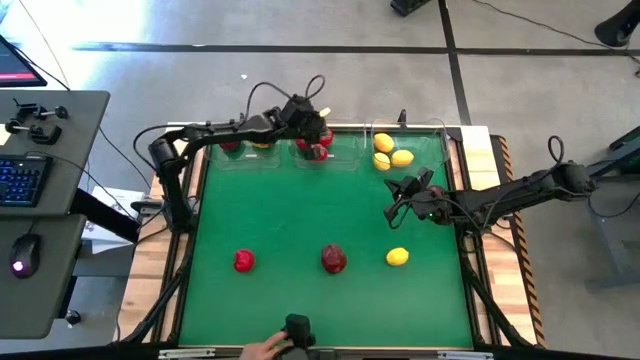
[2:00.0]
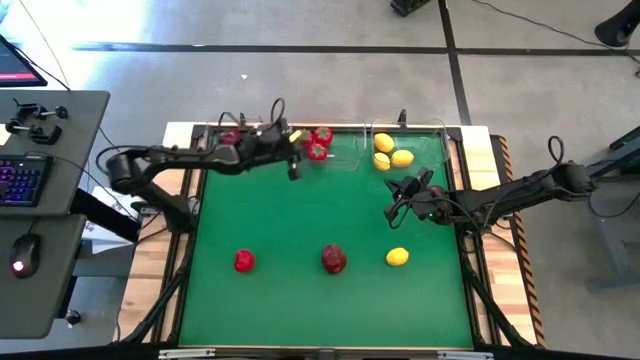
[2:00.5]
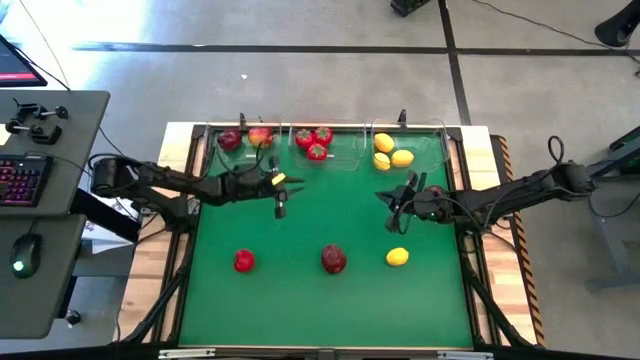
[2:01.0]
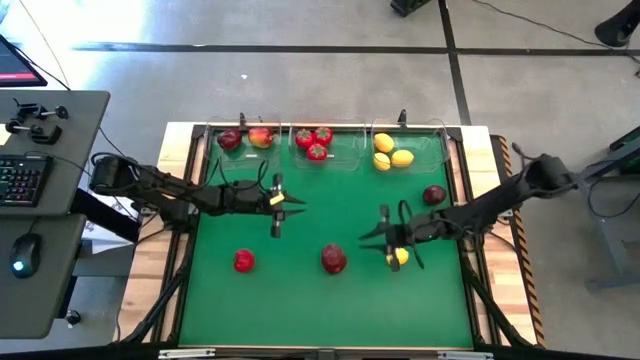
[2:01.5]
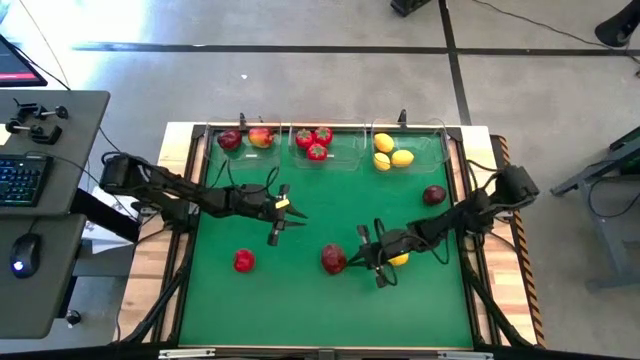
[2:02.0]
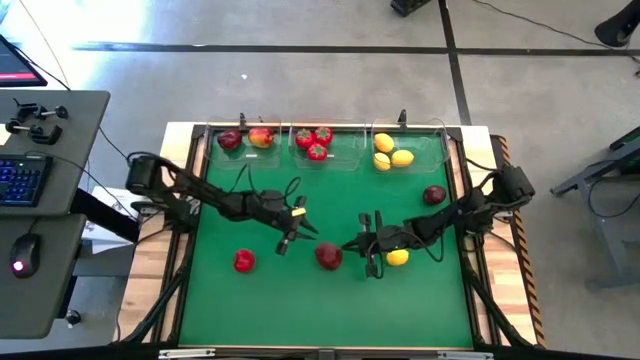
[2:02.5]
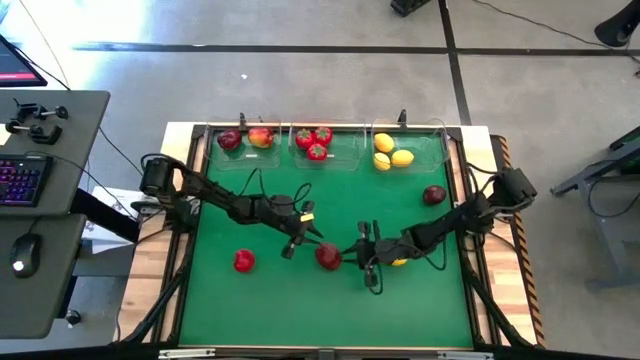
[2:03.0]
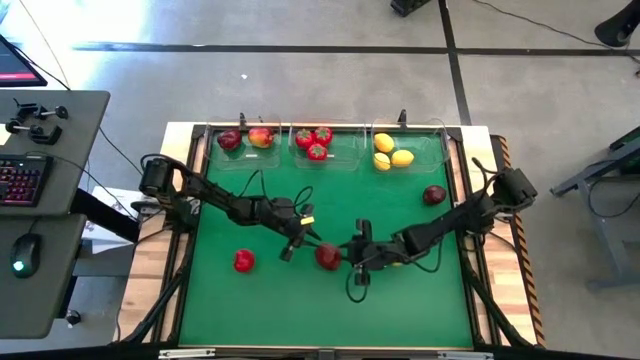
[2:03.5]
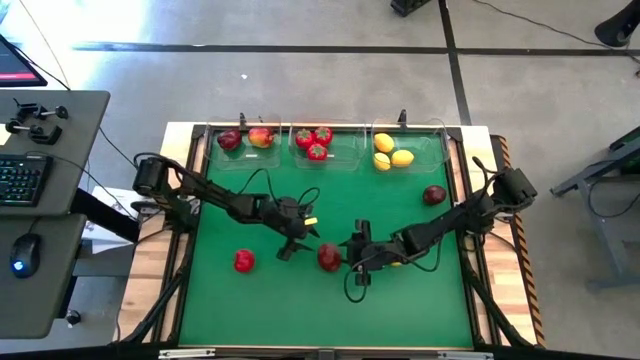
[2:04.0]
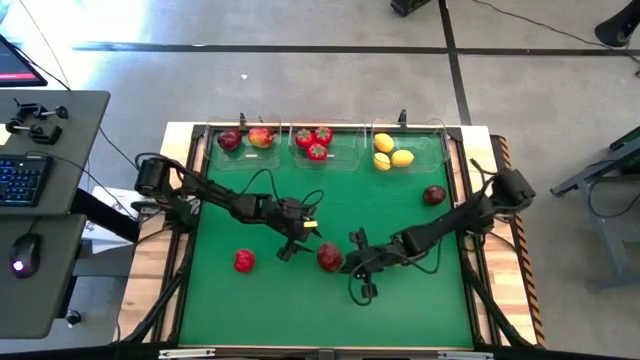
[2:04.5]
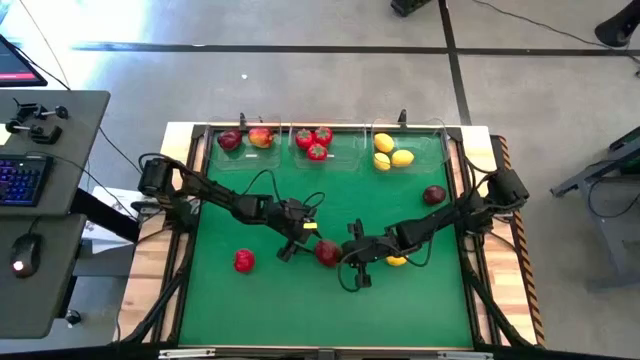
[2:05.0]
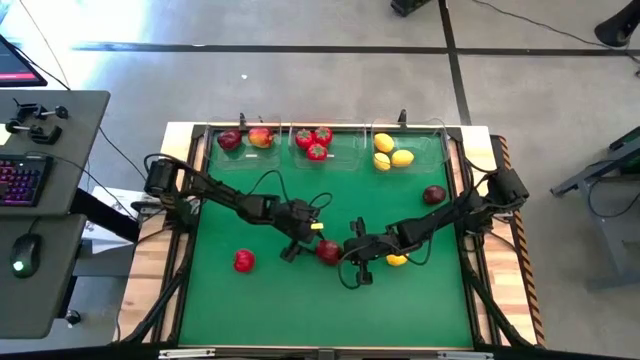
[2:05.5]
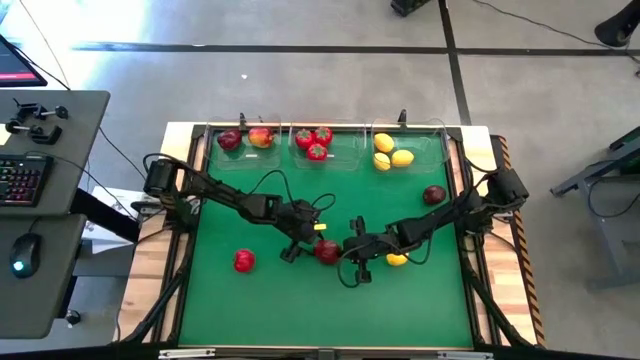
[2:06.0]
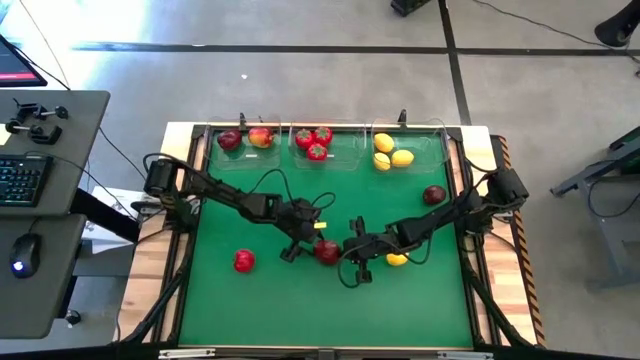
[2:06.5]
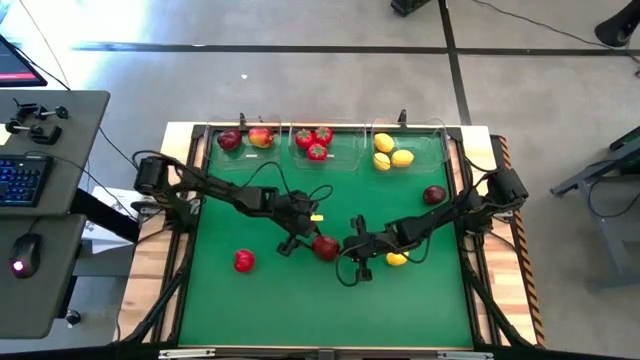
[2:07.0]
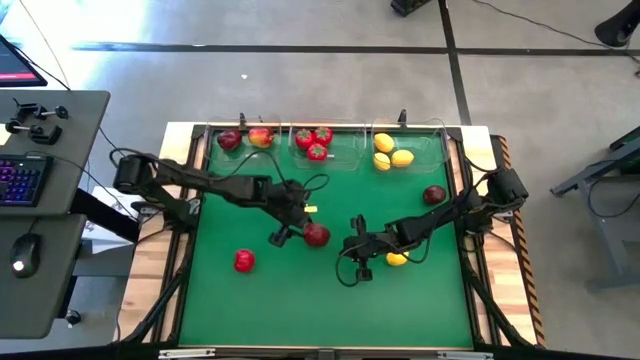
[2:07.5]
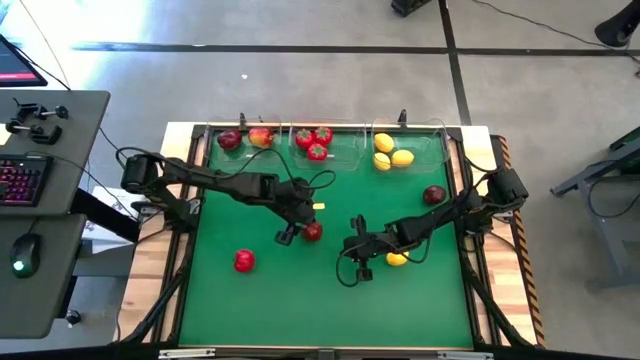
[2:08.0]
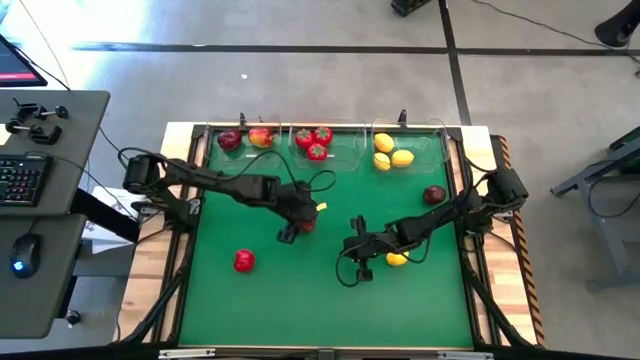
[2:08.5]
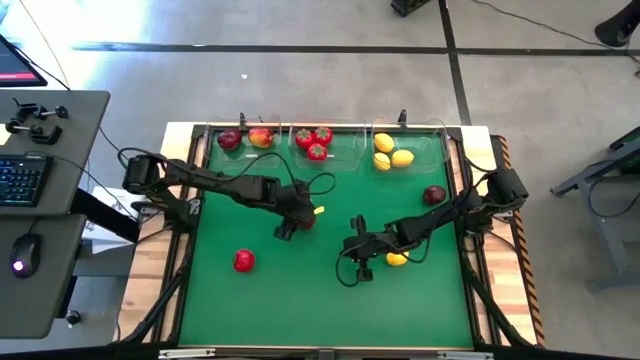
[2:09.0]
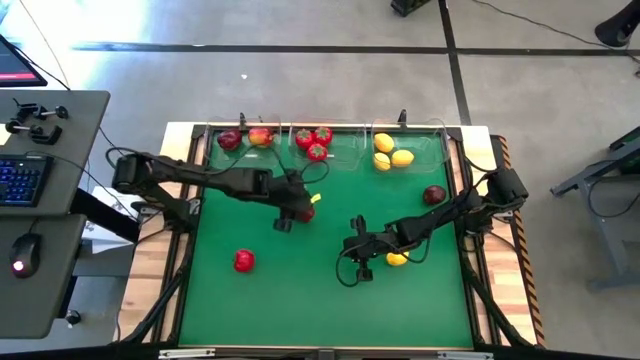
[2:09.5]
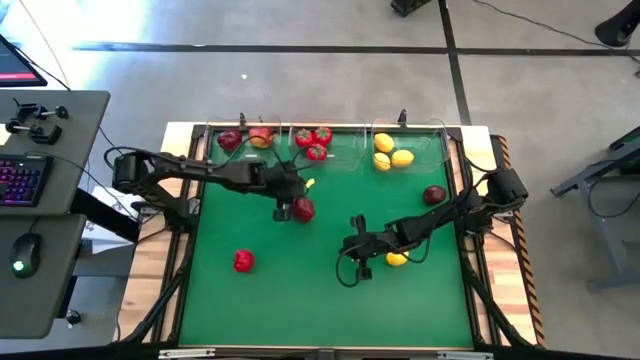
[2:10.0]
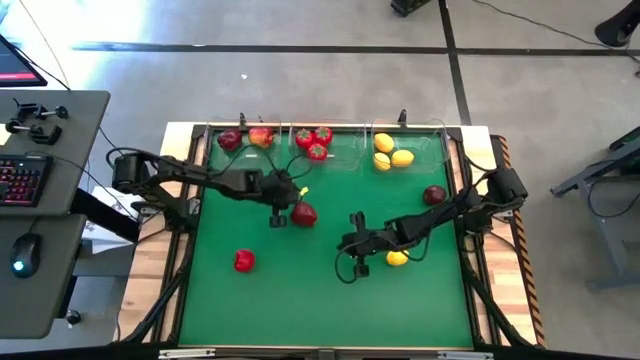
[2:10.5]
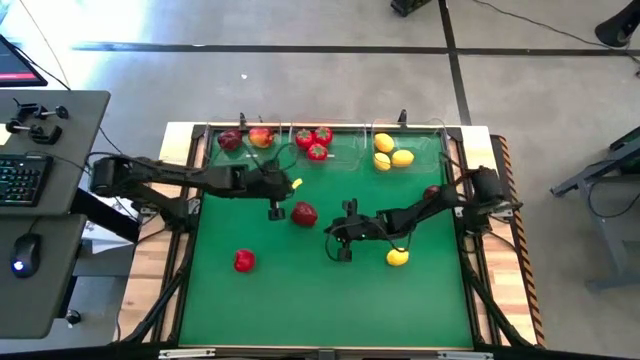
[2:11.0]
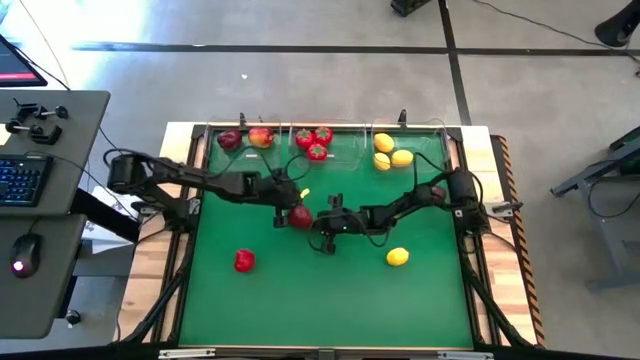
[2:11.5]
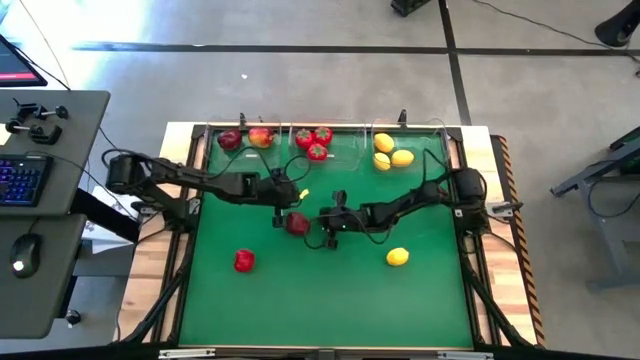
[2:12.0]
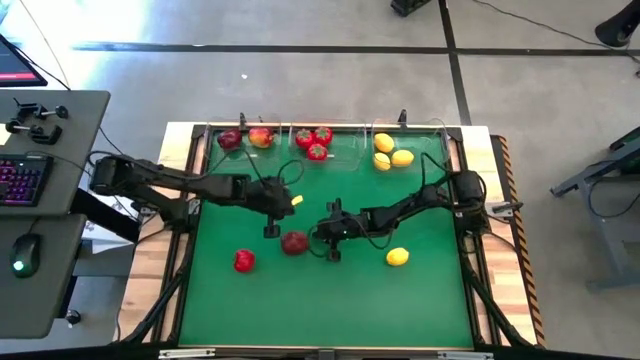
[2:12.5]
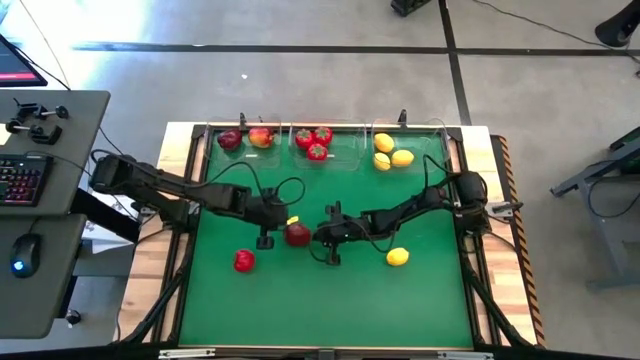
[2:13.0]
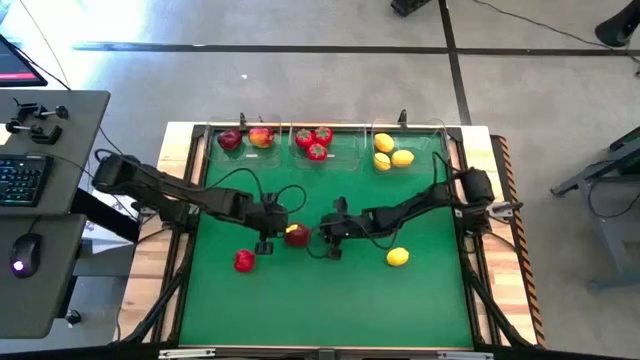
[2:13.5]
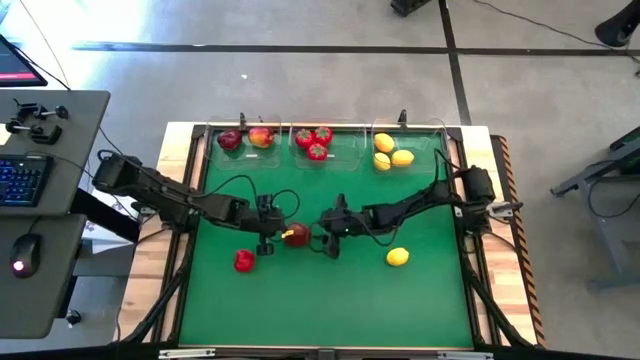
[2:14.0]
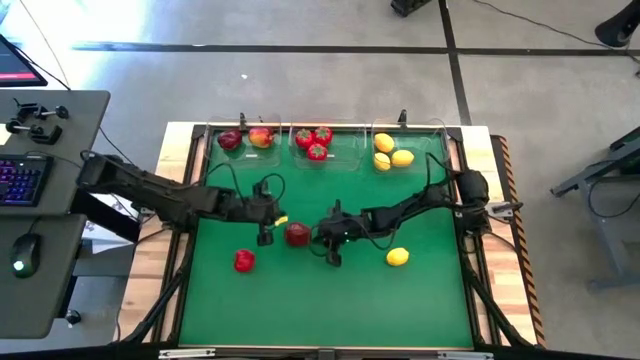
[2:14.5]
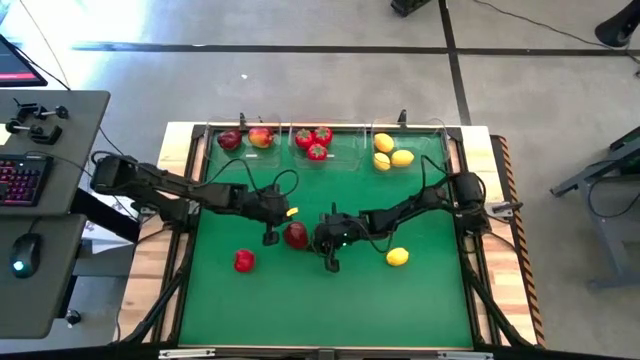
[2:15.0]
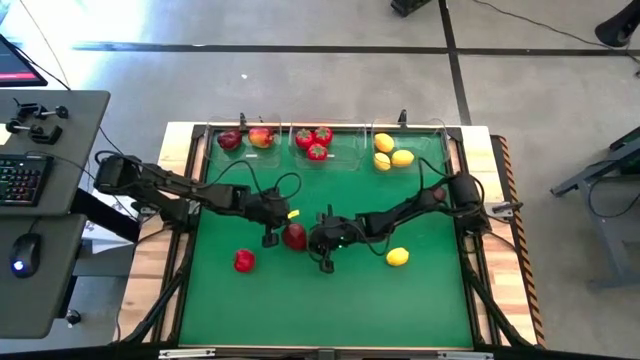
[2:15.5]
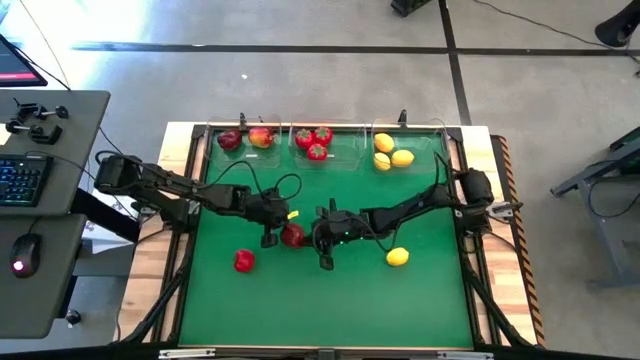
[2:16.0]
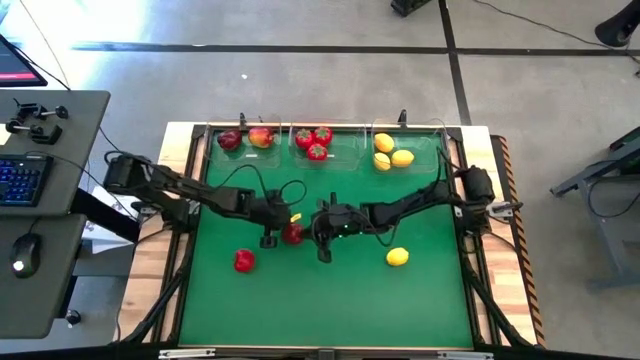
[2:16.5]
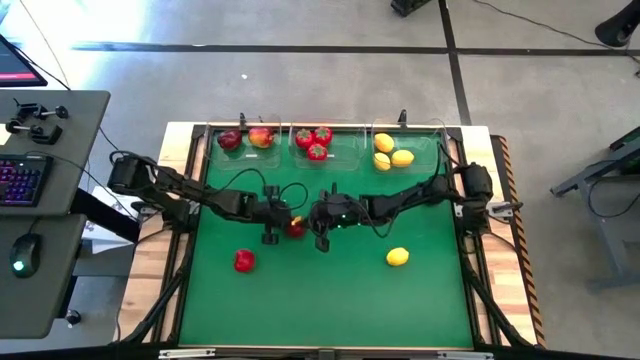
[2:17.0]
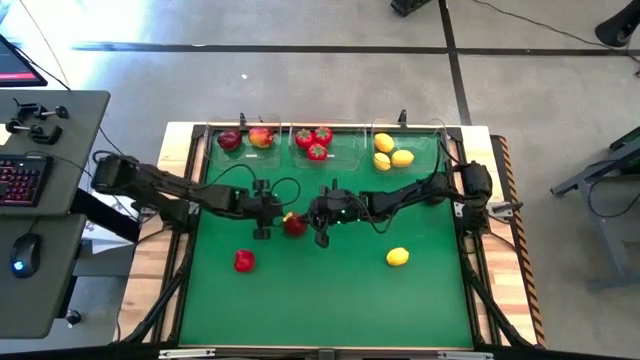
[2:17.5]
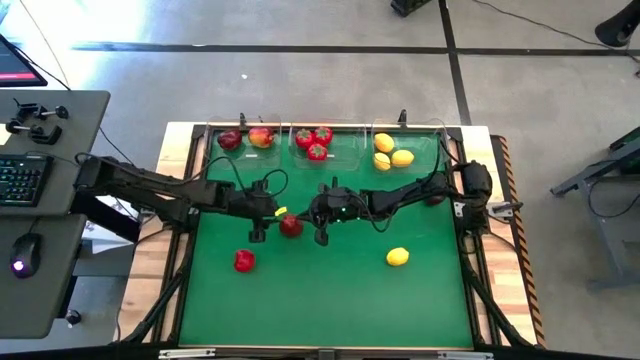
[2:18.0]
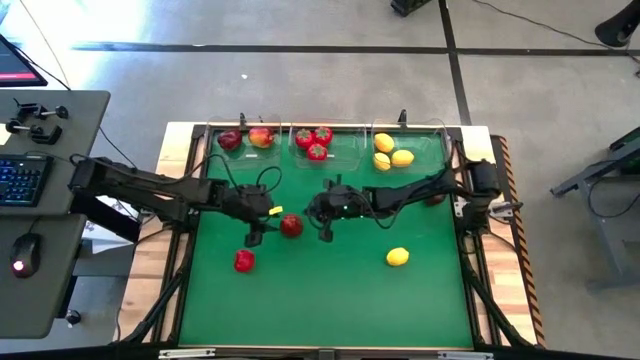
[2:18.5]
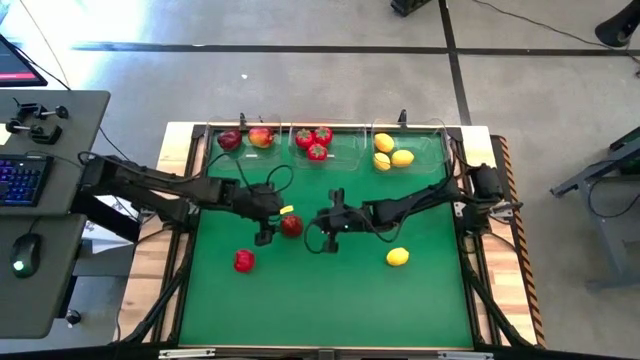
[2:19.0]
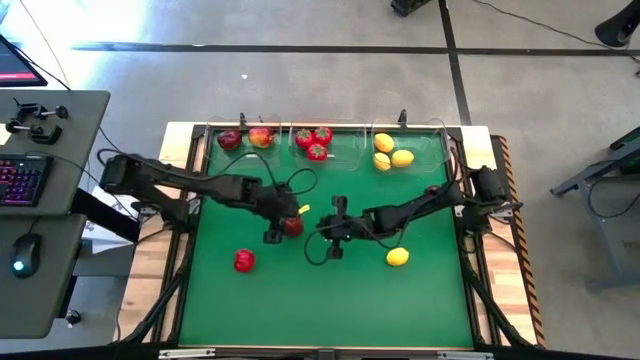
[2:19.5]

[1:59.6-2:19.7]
Task: Sort produce into baskets
Put the bottom apple into the left transparent bin

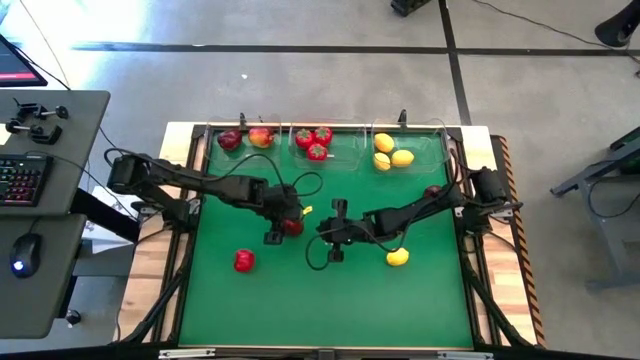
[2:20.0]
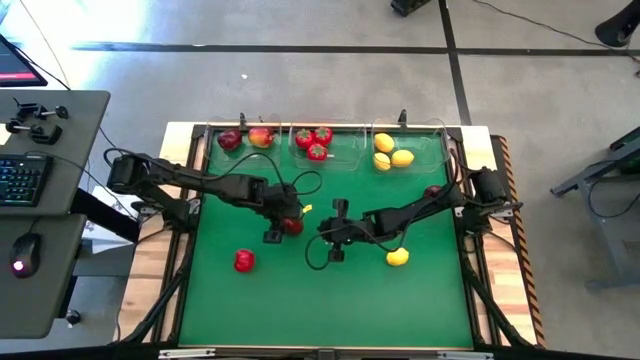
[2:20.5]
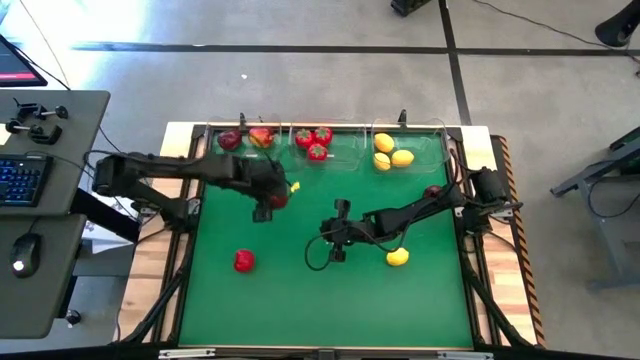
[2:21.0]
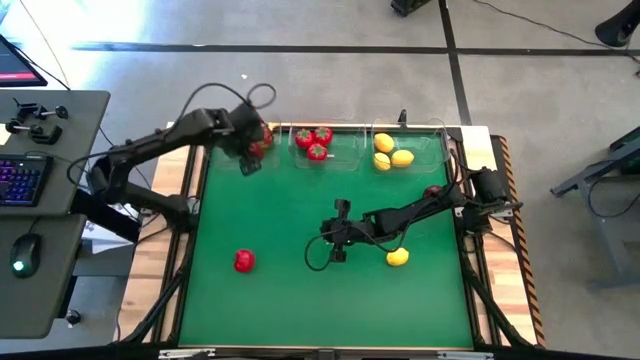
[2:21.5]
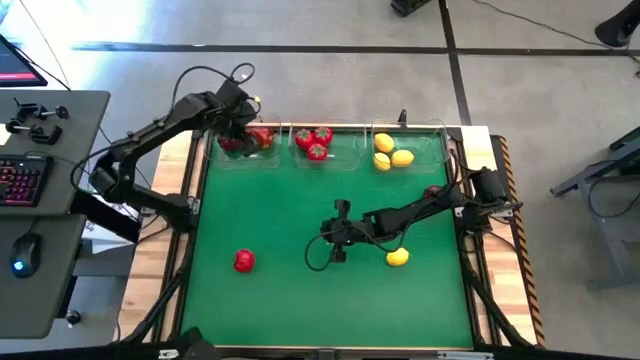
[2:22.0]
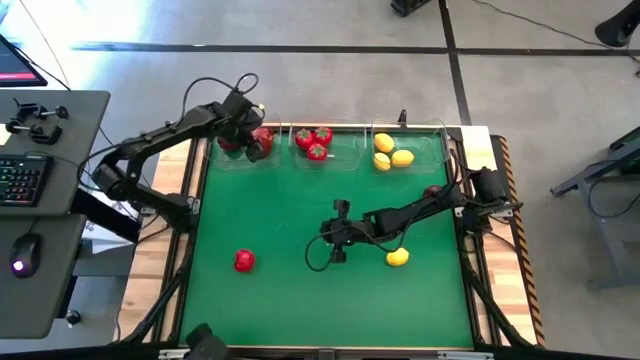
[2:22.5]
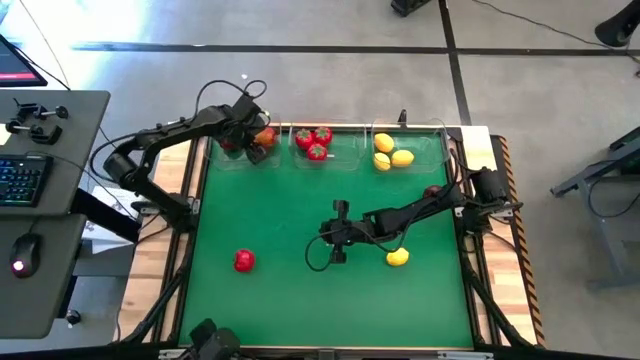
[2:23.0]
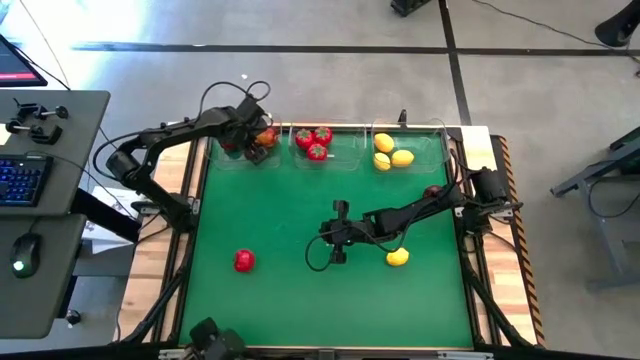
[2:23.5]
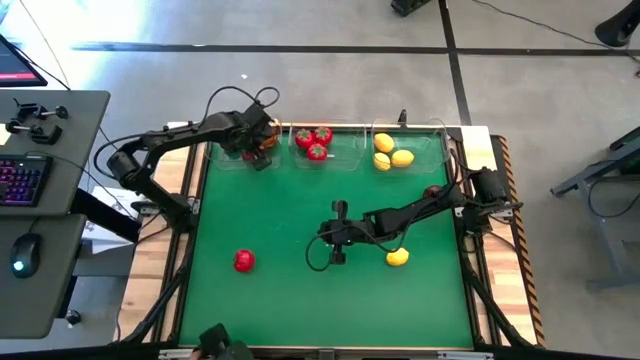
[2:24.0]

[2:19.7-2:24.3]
Put the bottom apple into the left transparent bin
